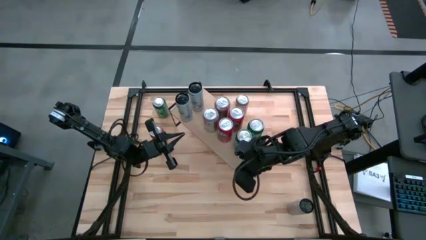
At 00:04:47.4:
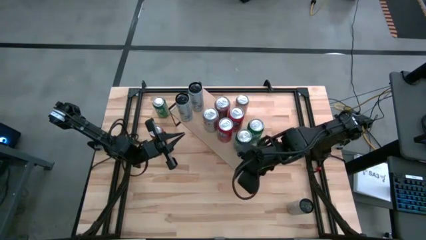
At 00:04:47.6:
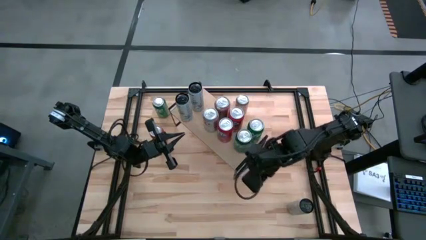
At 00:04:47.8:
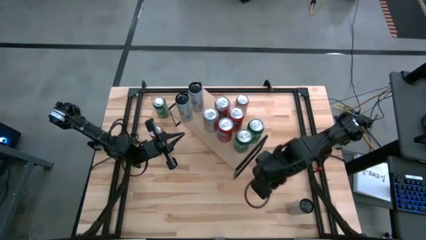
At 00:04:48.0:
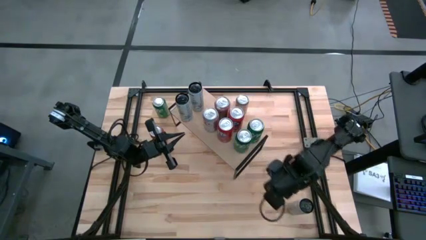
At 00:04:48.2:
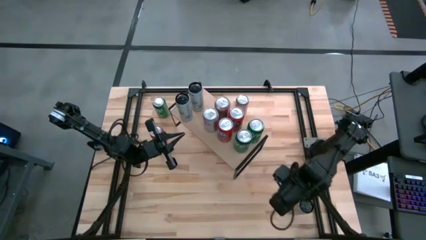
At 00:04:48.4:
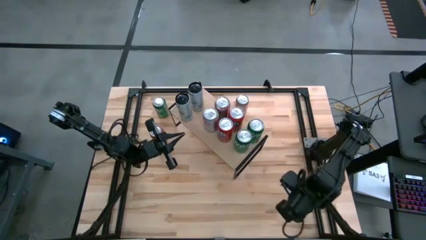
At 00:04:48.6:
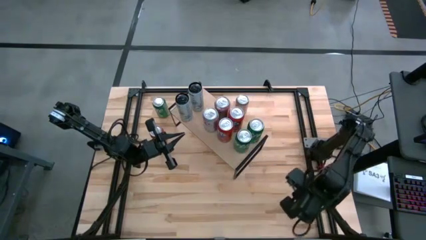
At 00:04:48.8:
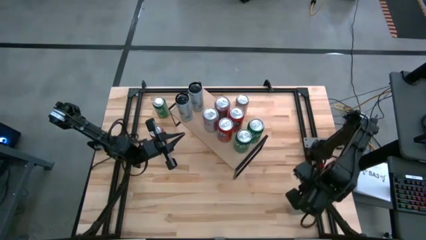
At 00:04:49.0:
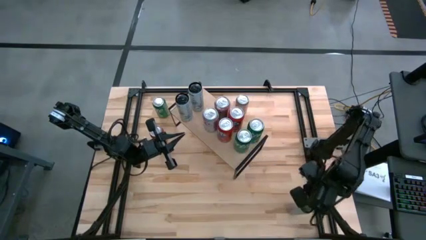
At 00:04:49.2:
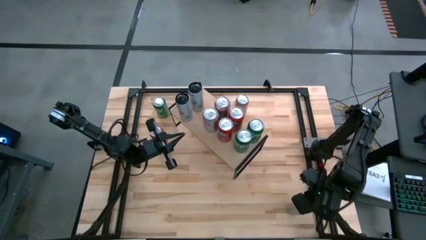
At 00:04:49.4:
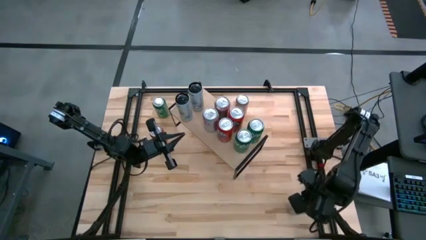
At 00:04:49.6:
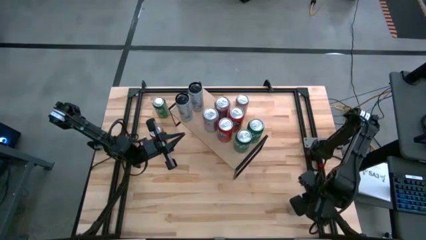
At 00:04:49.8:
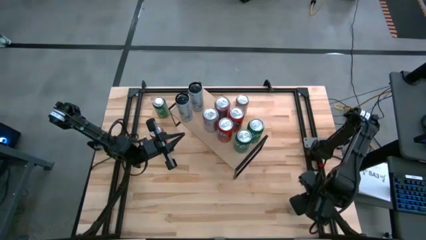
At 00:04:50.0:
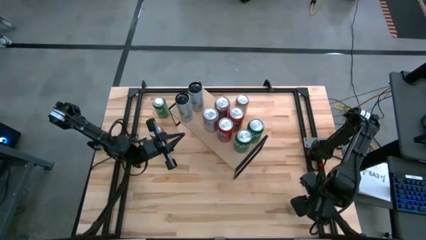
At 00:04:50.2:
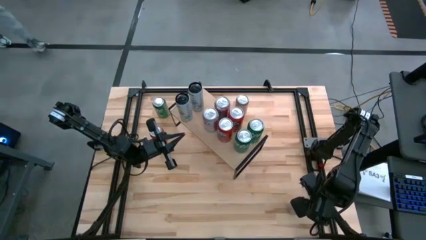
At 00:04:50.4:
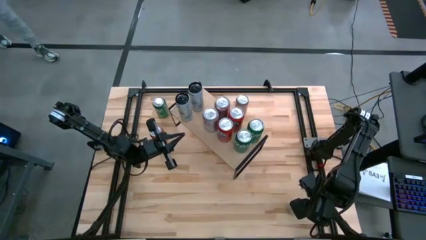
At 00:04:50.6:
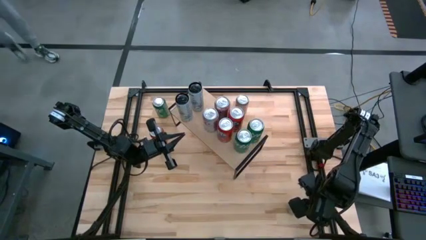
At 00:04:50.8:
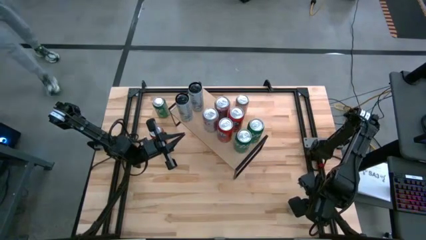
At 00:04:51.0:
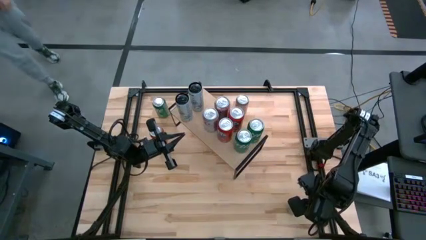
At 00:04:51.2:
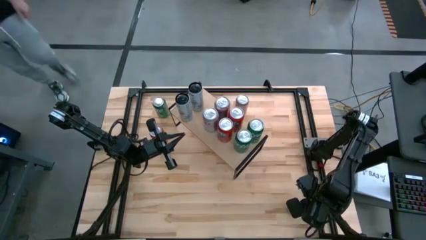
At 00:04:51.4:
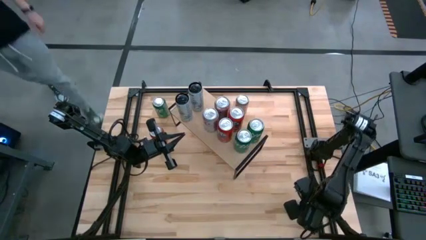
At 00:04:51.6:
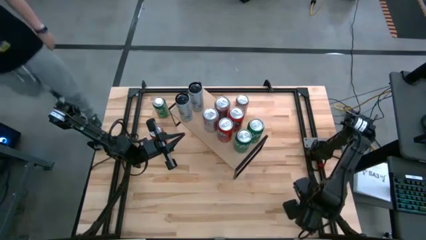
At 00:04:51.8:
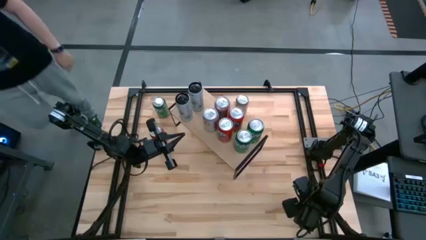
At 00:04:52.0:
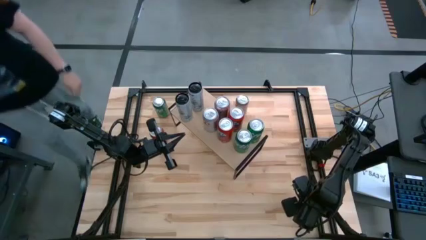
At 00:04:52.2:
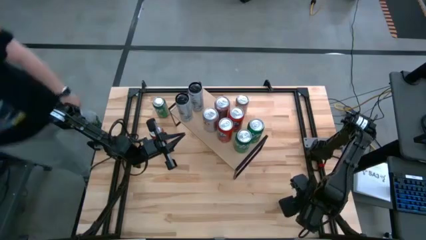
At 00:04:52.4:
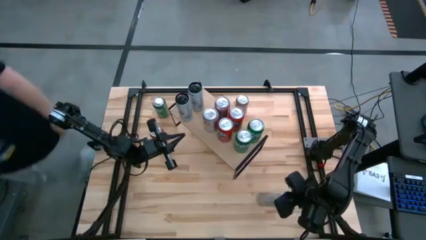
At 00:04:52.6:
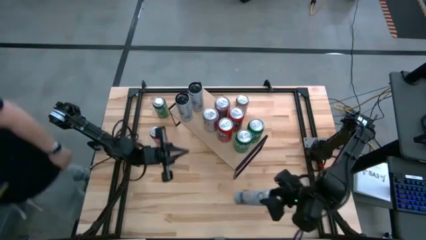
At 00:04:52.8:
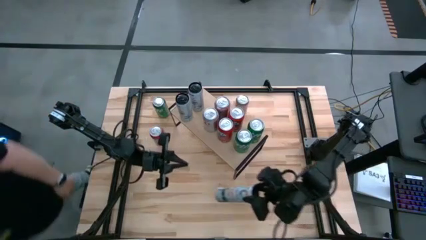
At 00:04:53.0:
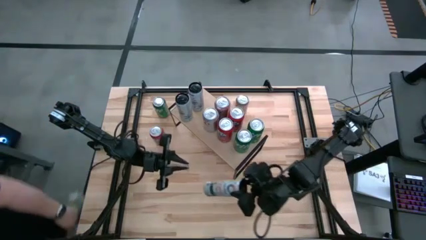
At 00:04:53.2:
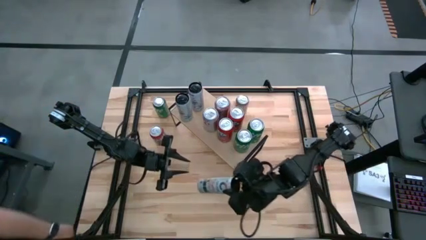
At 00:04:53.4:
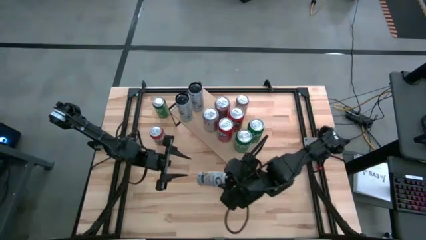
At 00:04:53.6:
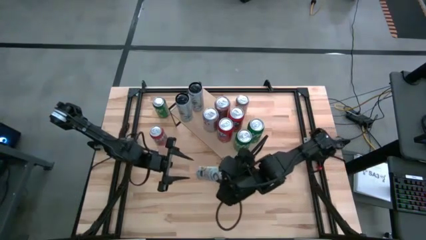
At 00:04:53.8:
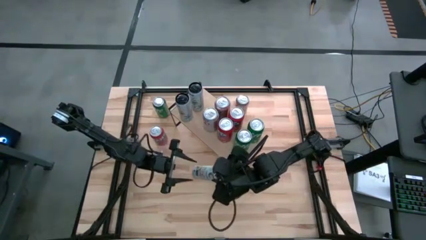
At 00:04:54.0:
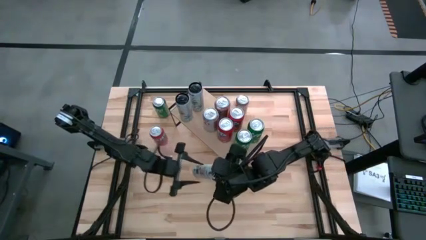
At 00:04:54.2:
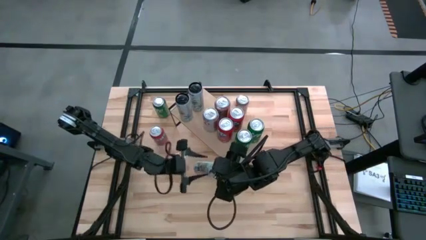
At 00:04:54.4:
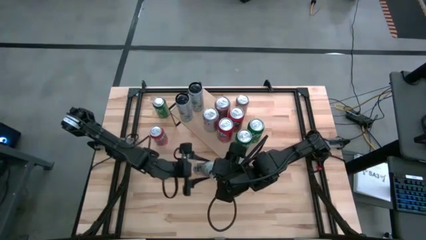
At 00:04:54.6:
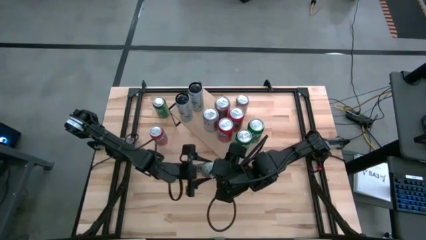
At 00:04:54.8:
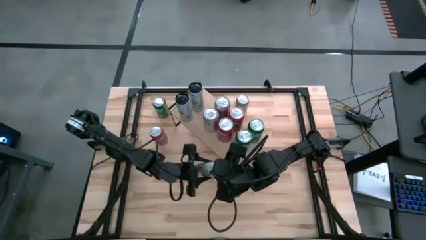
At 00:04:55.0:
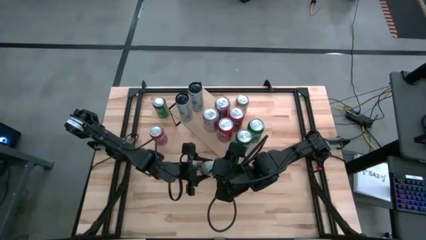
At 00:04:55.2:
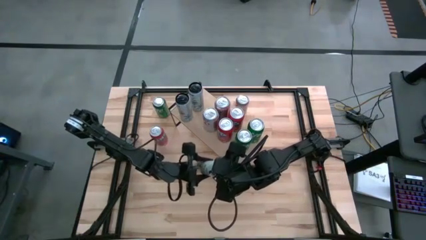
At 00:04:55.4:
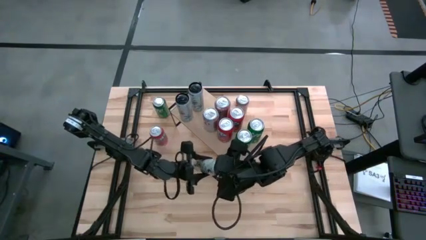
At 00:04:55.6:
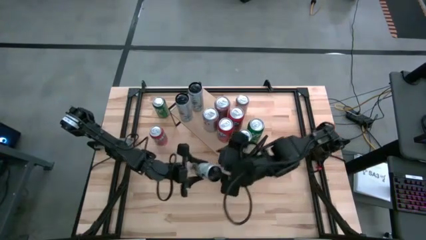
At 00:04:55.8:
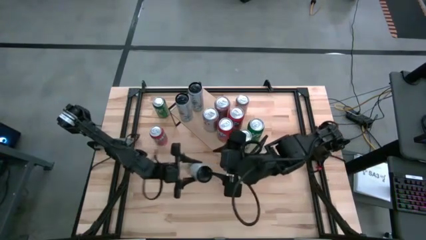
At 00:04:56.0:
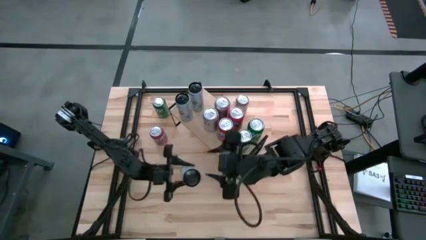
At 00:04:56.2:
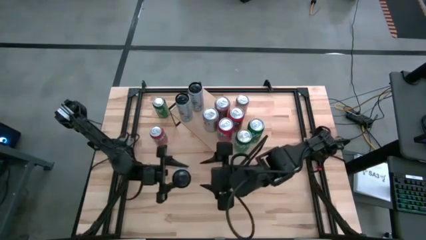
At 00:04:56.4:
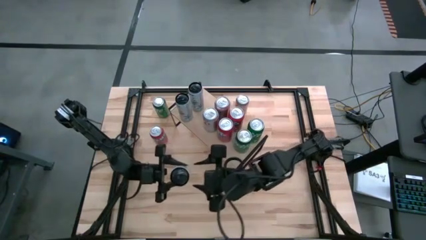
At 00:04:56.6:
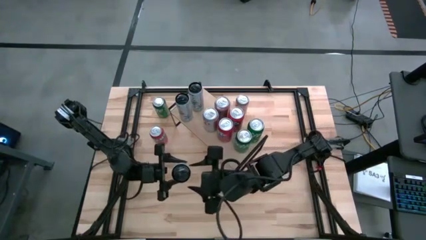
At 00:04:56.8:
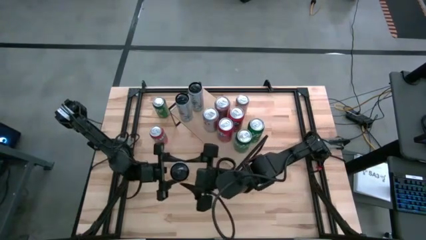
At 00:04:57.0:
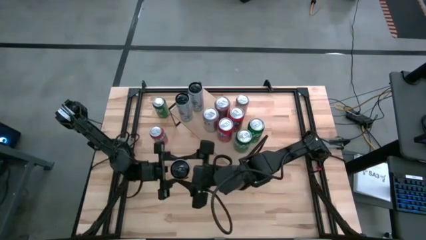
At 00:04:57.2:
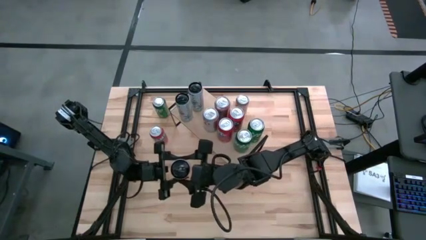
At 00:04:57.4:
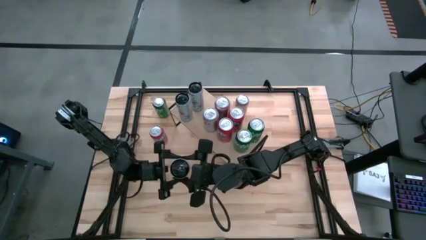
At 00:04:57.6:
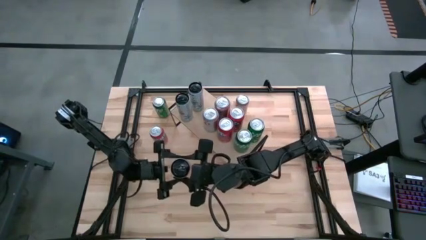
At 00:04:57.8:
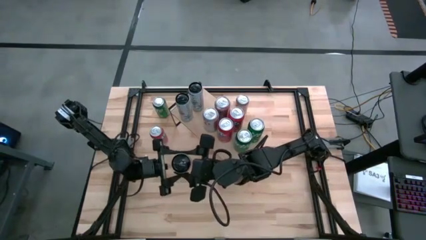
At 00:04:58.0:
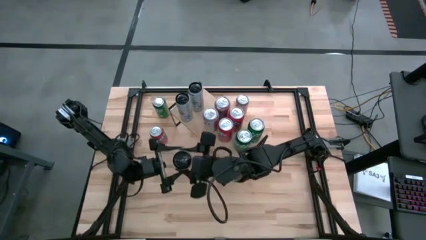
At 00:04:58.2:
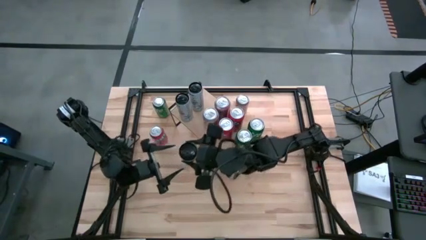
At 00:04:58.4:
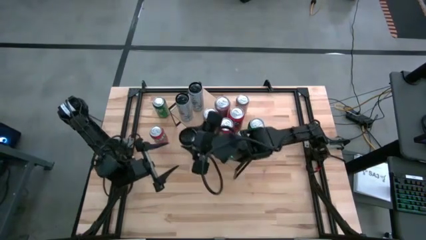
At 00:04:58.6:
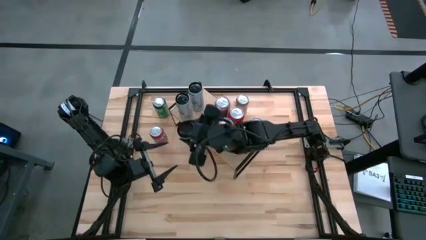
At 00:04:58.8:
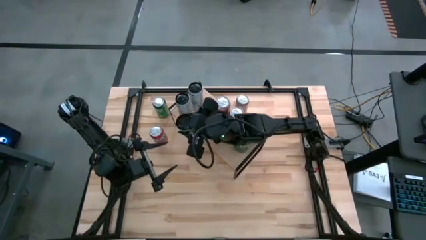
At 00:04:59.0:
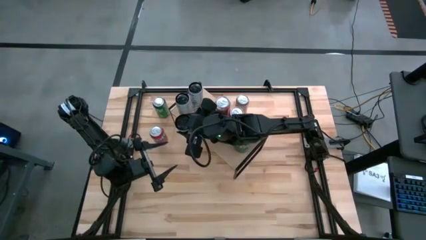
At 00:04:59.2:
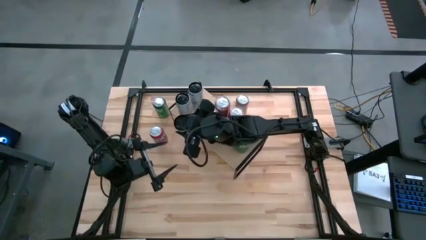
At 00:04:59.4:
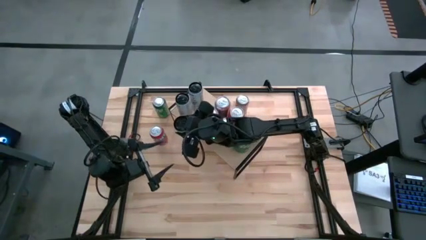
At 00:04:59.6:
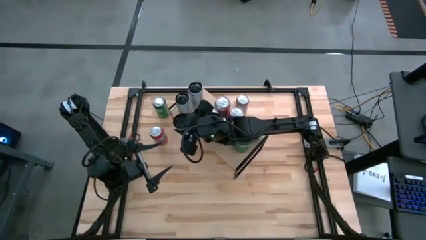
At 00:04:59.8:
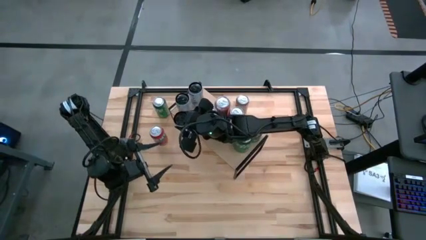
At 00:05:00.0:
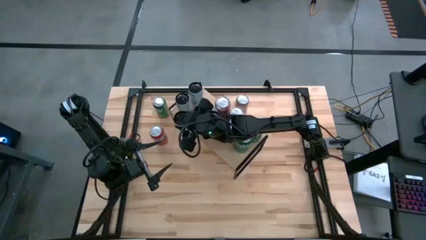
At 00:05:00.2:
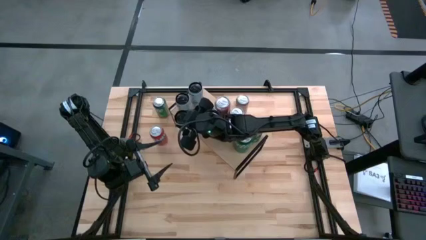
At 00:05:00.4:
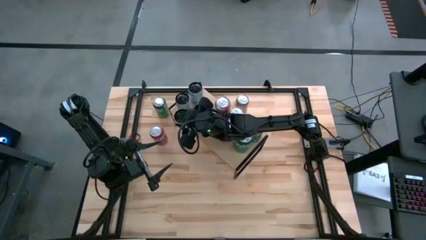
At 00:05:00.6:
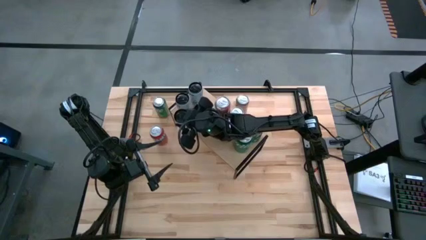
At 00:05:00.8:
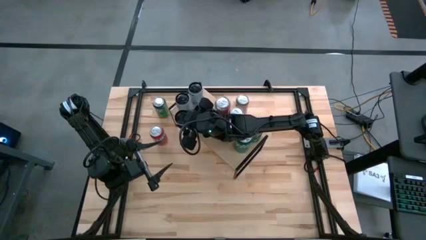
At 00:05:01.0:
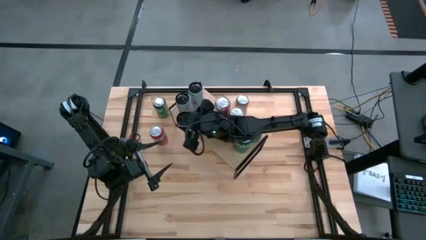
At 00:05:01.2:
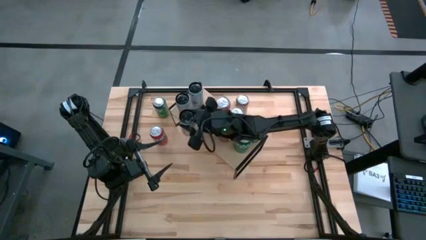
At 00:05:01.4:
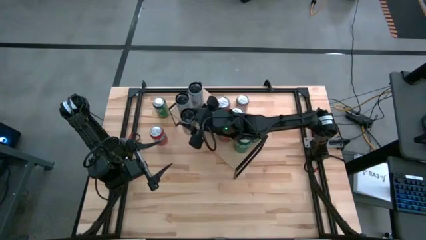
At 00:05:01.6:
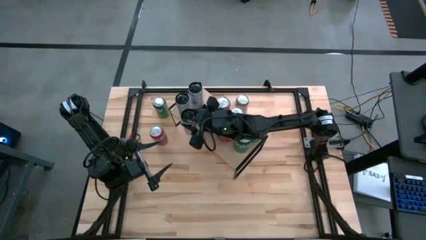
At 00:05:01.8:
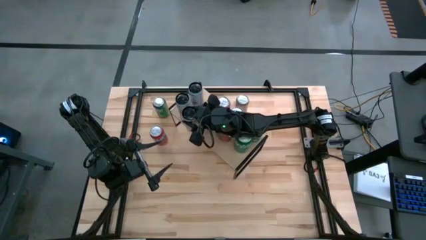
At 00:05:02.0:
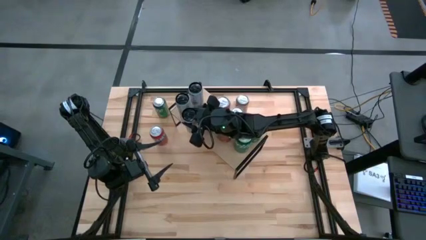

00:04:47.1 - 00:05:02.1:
Task: Place canned beverage on shelf
Put the yellow soda can on the shelf aligned with the blue soda can

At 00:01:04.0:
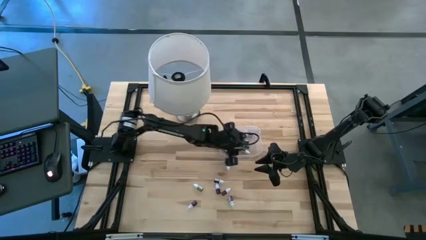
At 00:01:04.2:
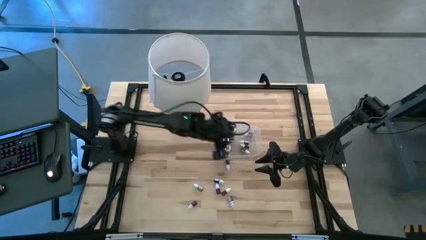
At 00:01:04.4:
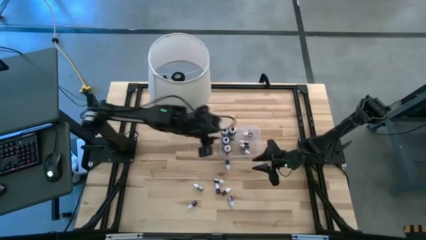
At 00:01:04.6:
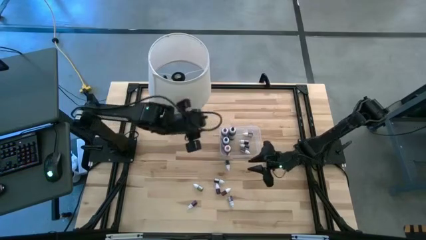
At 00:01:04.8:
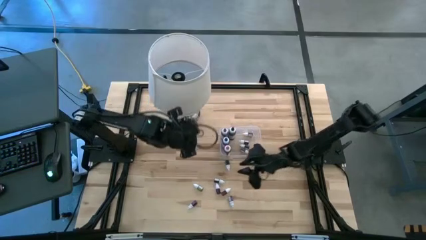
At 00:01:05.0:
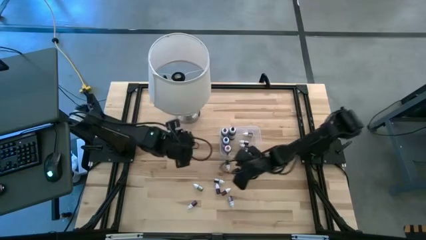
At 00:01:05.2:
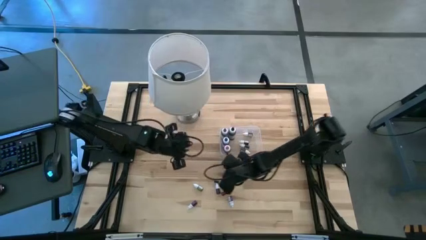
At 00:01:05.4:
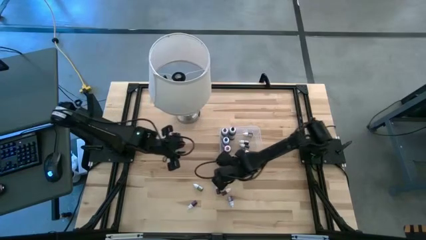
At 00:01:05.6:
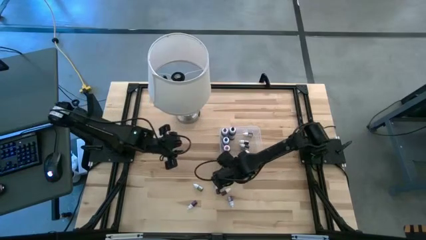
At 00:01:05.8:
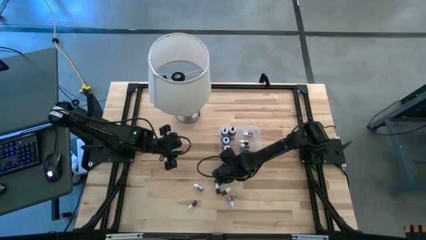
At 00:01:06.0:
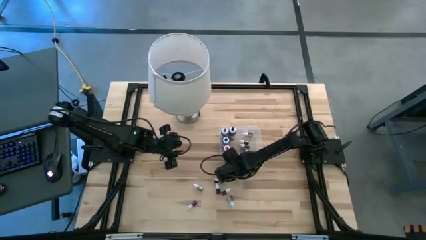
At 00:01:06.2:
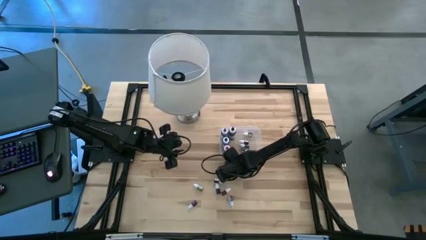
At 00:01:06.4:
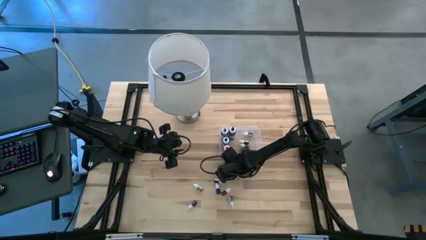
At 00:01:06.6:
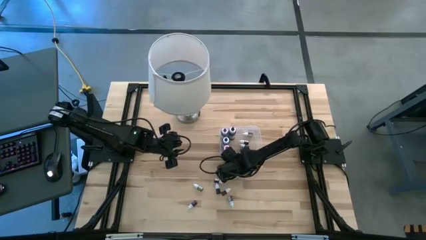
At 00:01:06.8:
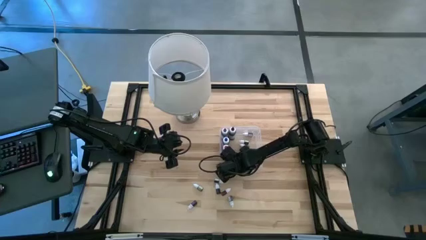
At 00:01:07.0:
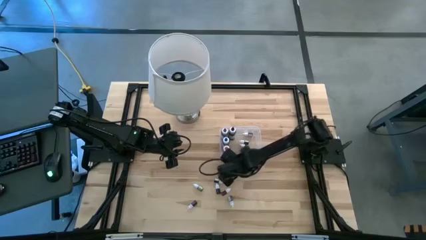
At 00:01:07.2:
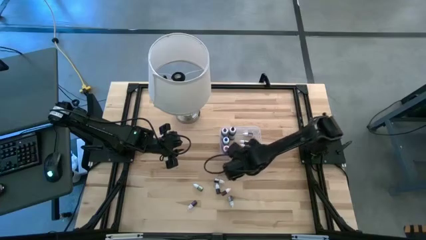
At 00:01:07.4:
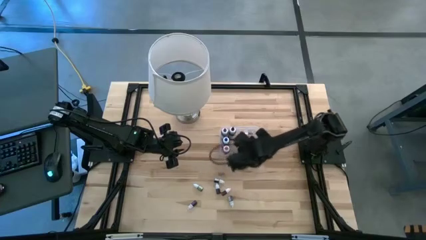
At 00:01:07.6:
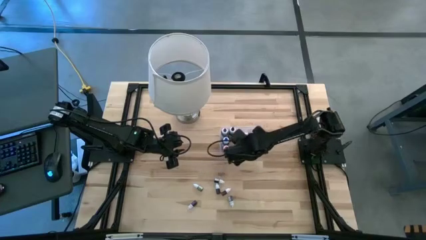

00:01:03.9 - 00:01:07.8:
Task: Pick & Place food coloring
Put the small dark green food coloring bottle into the transparent bin
